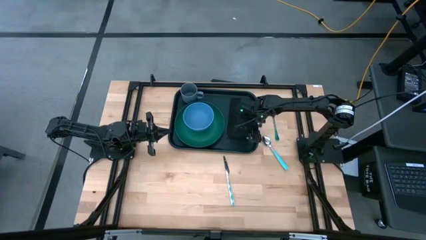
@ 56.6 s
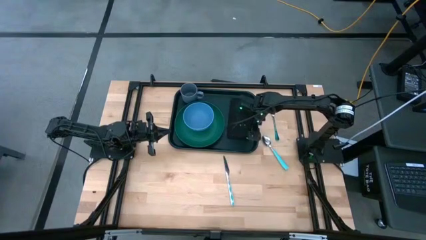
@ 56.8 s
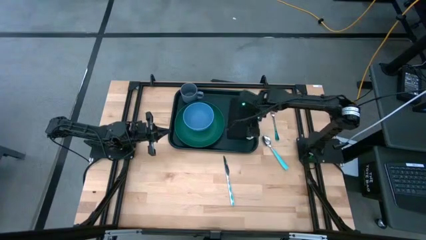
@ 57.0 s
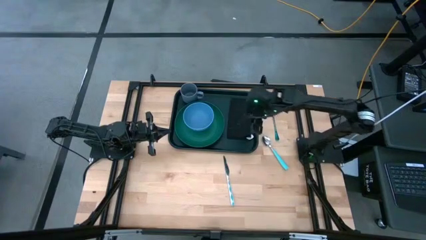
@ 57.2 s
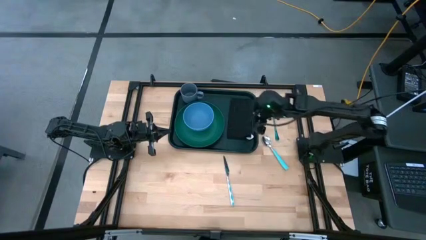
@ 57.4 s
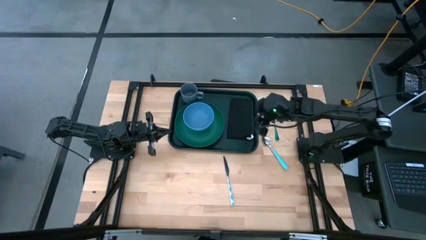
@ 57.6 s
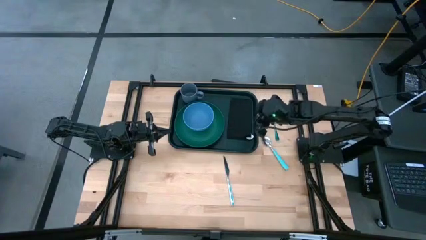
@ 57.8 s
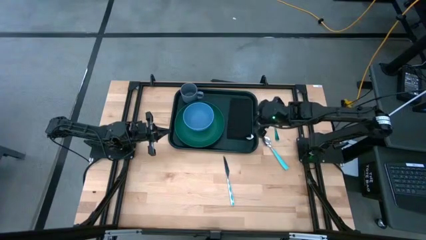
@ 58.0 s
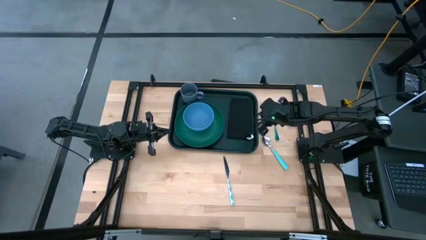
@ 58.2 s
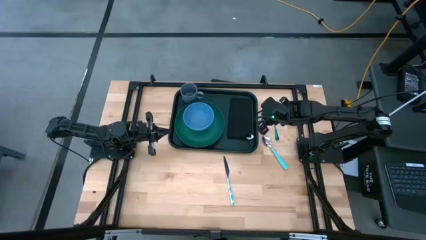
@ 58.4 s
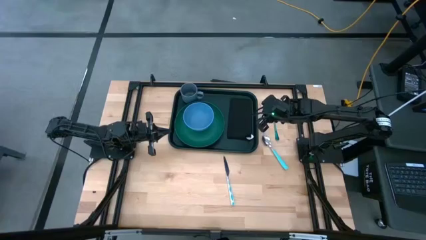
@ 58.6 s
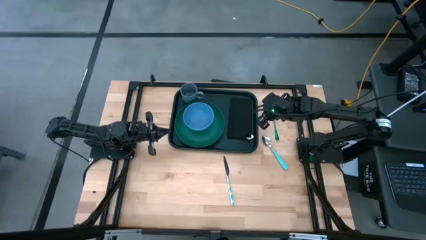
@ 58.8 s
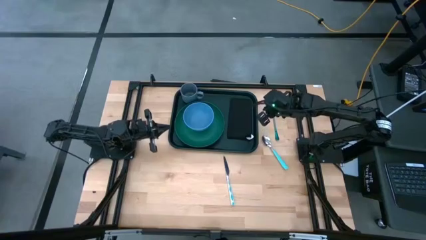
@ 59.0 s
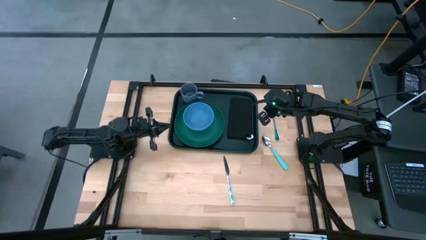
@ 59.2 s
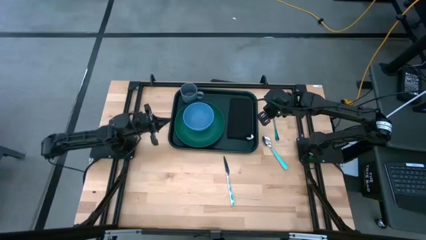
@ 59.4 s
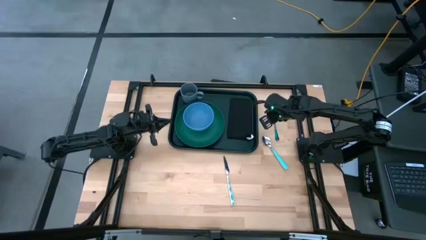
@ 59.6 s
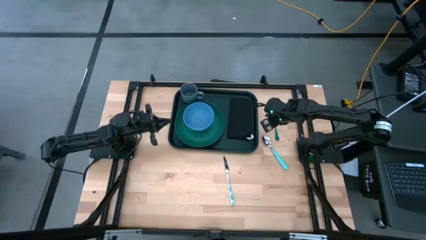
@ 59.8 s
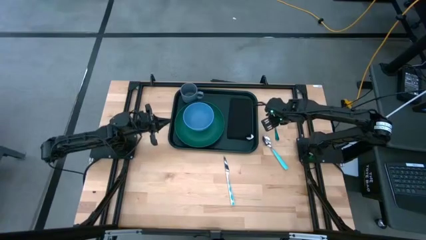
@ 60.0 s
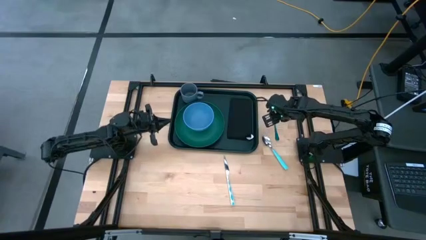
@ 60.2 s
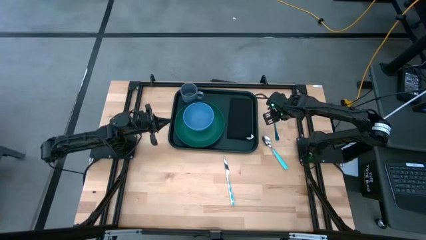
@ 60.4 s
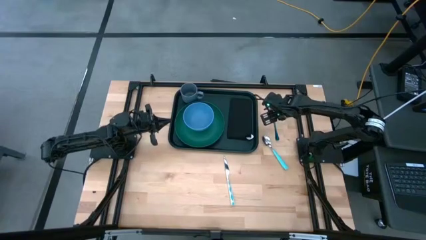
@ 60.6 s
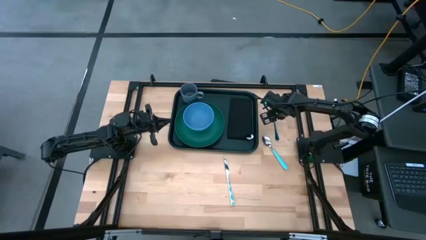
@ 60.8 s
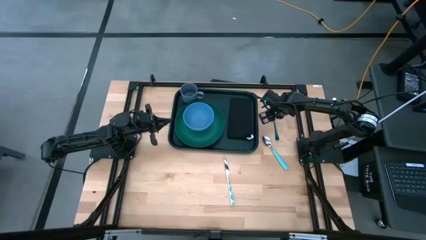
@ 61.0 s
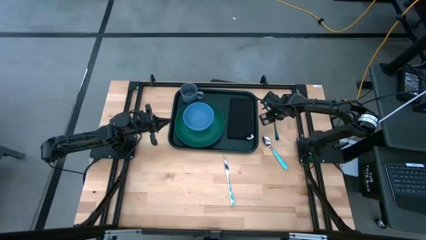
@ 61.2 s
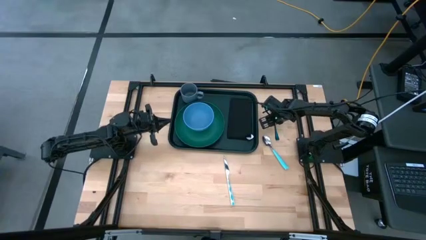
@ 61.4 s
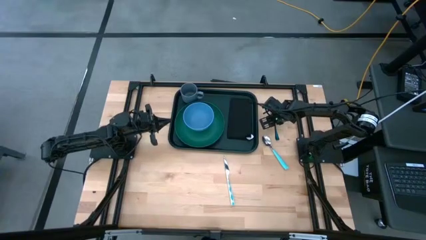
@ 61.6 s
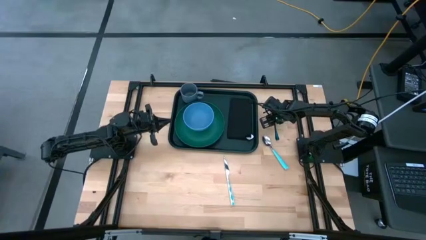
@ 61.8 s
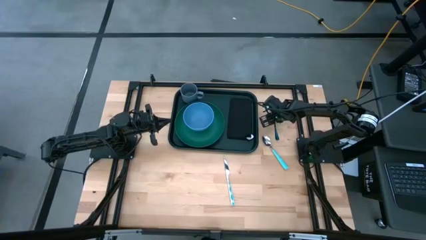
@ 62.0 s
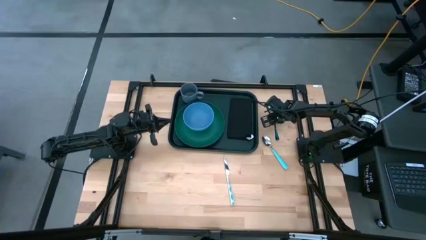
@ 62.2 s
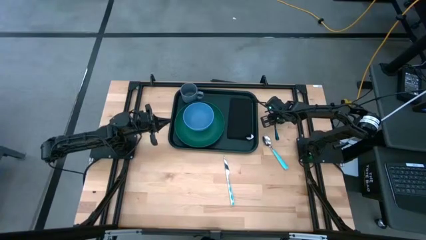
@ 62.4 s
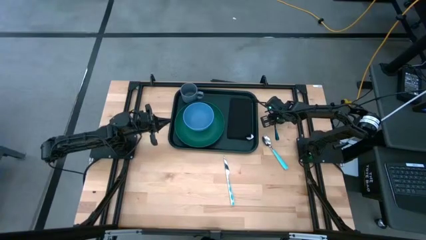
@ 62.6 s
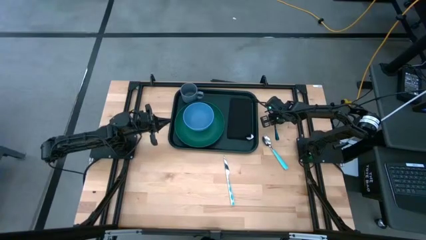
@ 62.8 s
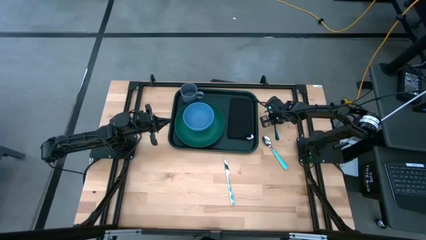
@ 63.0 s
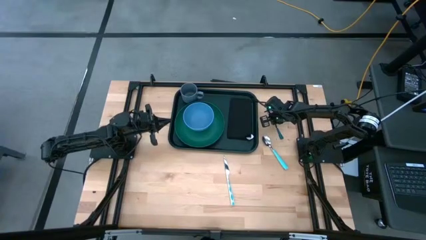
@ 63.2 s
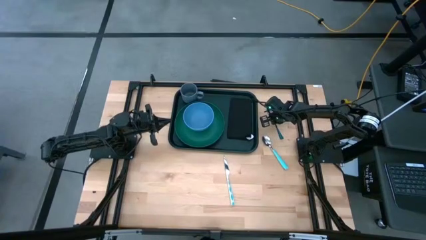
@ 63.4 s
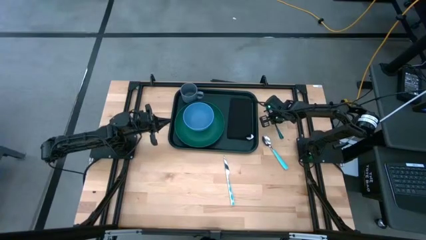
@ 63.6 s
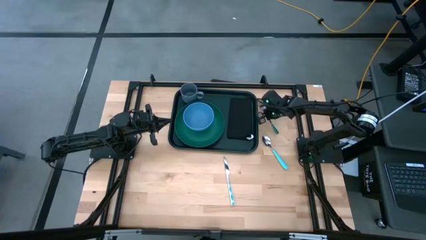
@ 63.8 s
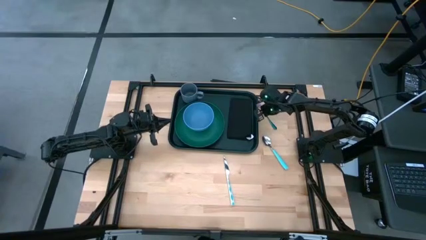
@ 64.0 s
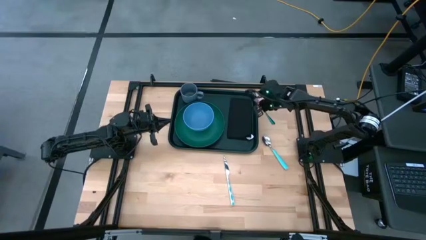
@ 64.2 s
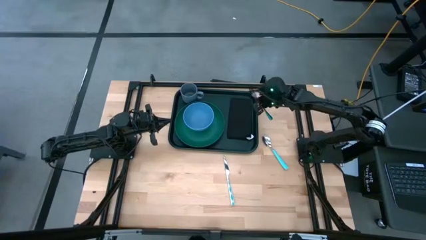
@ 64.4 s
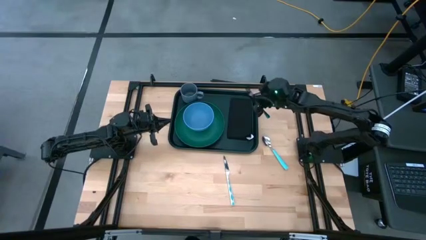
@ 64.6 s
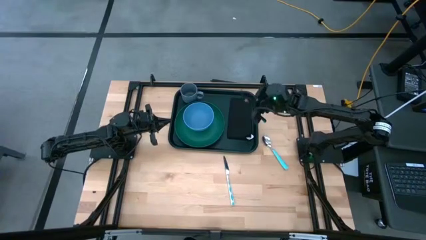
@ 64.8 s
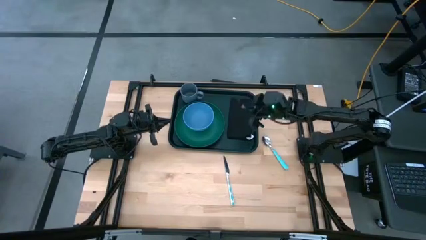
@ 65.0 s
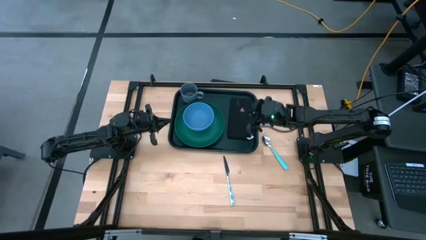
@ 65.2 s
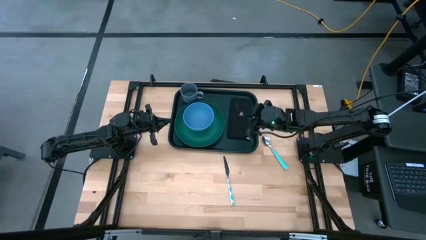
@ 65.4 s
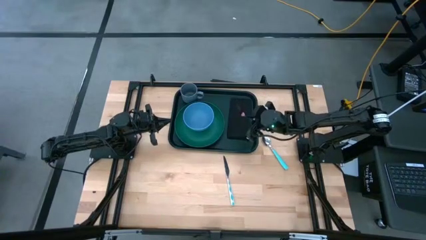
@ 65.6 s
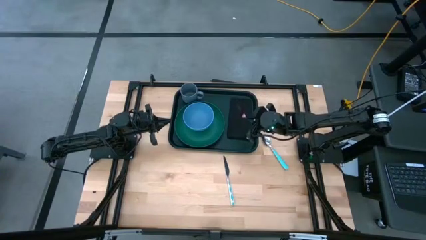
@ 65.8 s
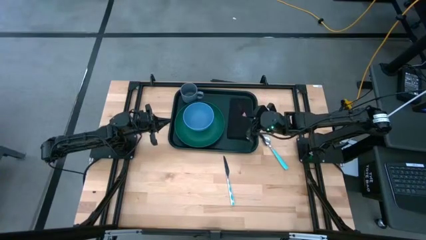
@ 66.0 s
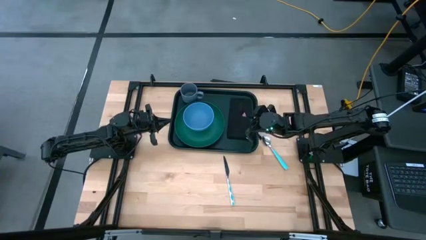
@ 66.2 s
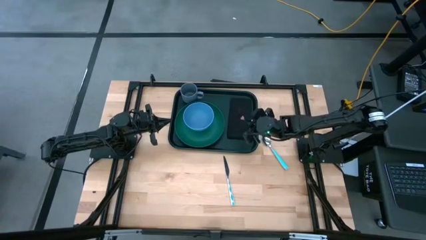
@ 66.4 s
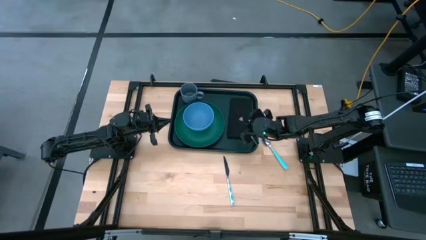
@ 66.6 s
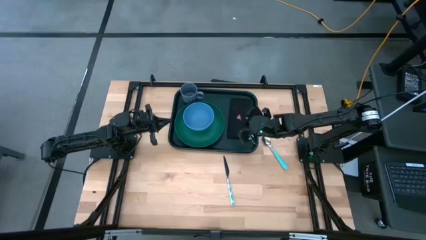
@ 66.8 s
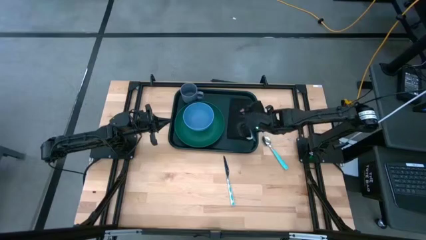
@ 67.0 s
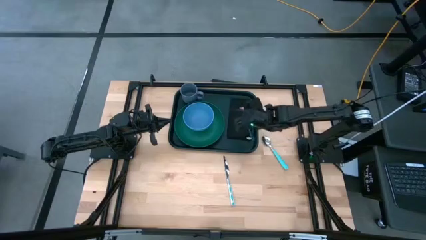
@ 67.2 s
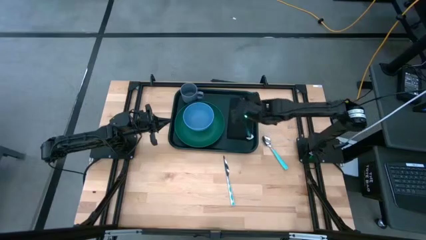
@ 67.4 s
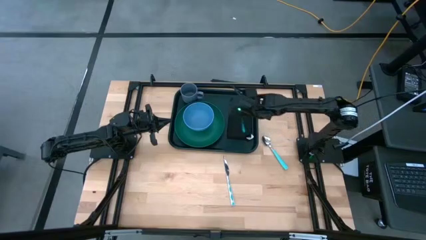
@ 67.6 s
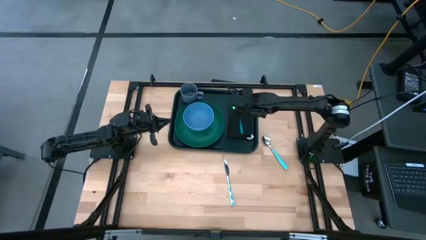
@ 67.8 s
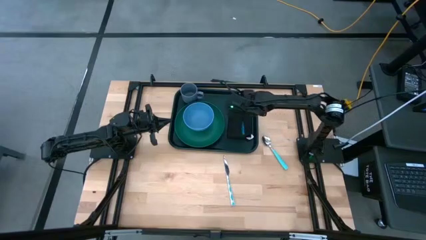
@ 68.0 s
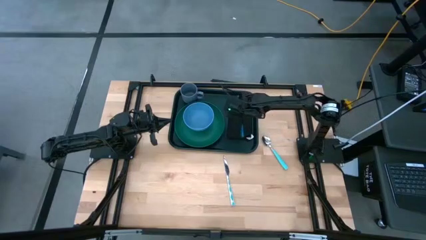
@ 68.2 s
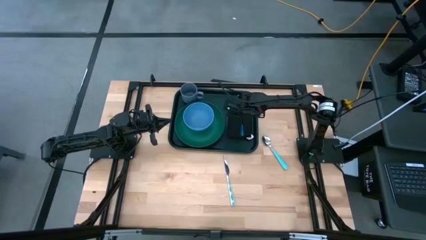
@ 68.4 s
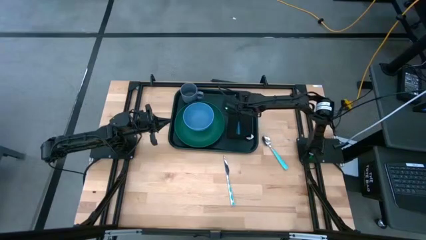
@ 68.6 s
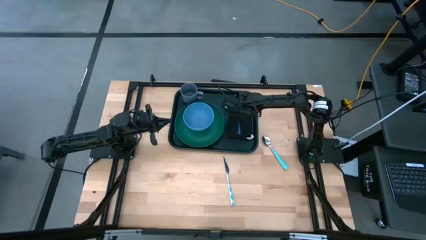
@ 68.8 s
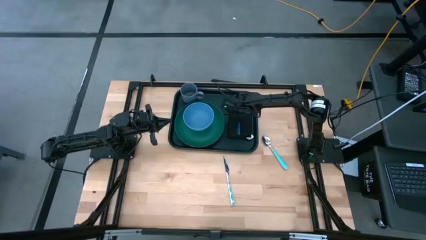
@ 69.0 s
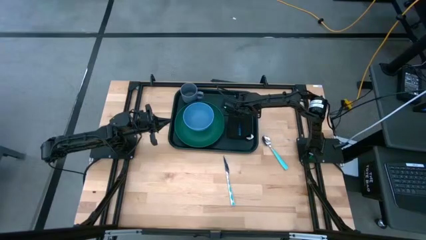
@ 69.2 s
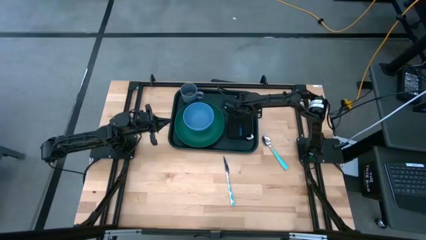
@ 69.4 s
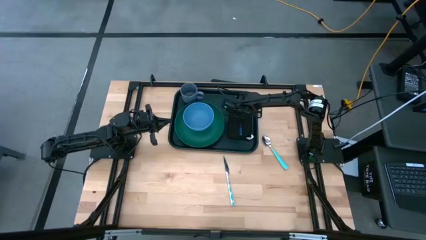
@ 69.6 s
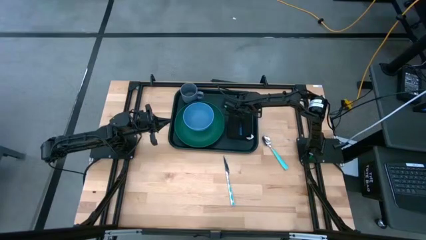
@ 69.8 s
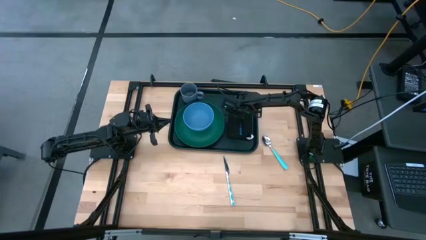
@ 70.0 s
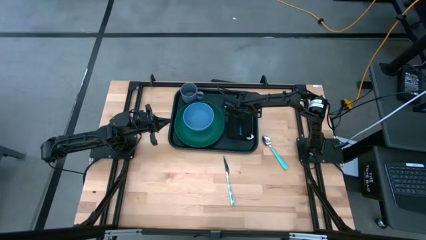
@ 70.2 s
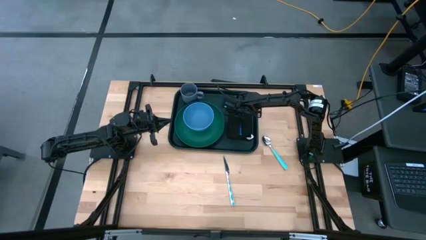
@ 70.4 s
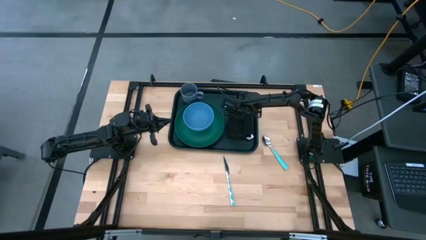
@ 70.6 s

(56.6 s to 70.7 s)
Task: Set up tray
Put the blue fork on the black napkin
